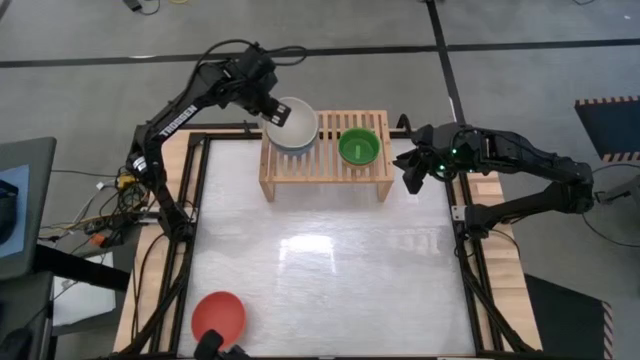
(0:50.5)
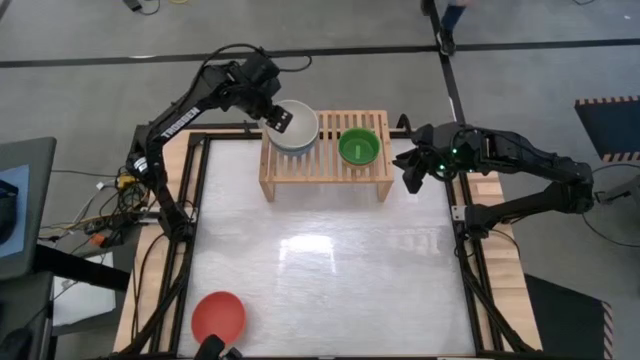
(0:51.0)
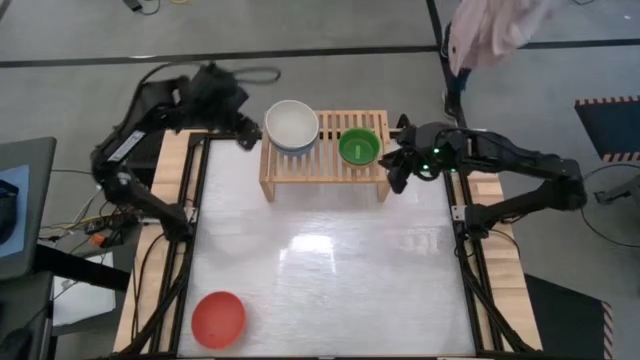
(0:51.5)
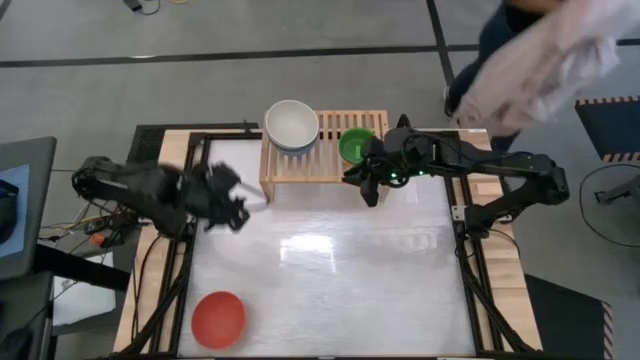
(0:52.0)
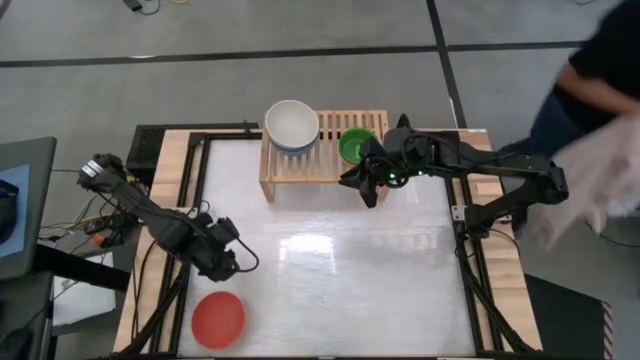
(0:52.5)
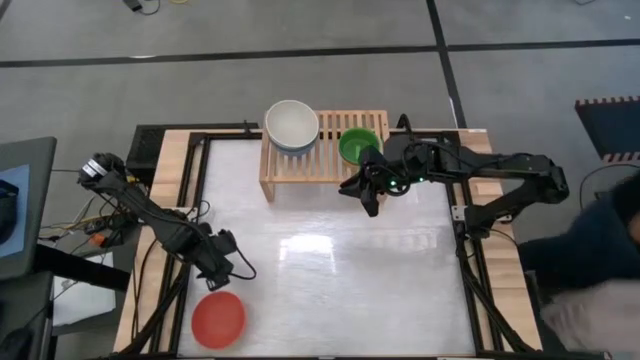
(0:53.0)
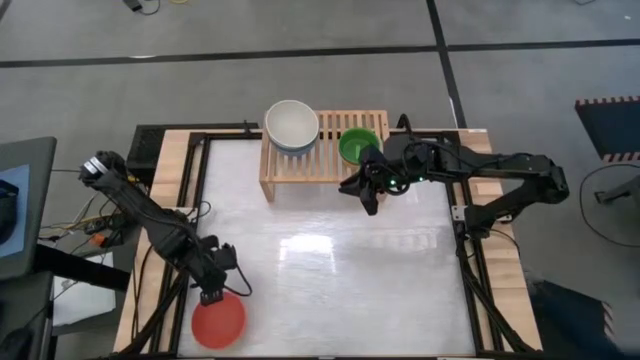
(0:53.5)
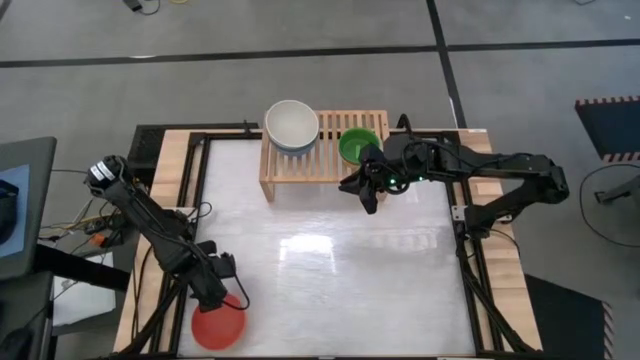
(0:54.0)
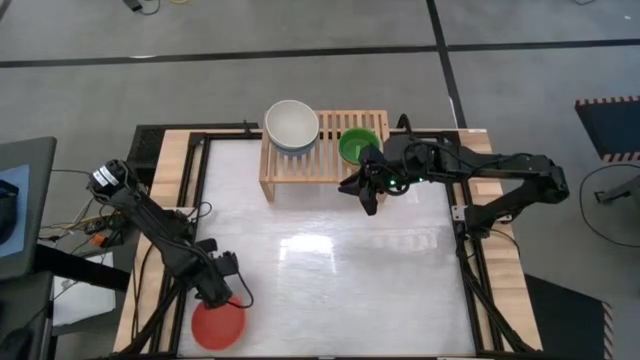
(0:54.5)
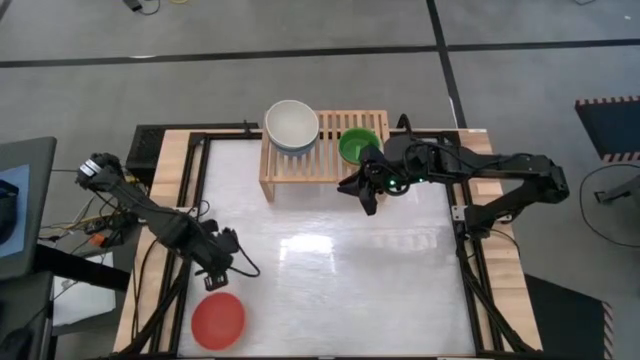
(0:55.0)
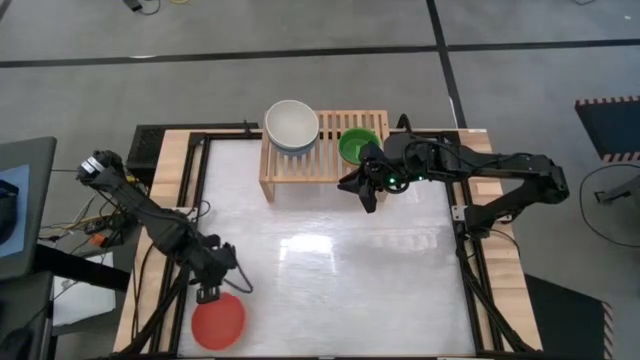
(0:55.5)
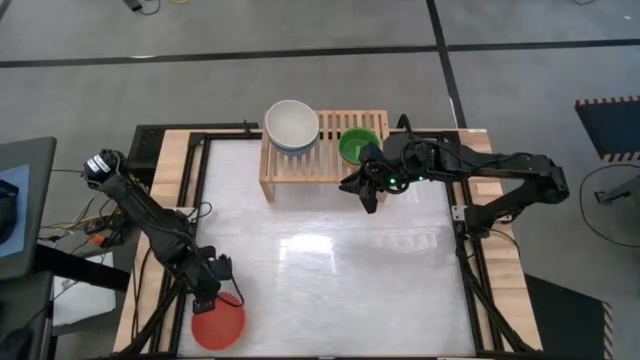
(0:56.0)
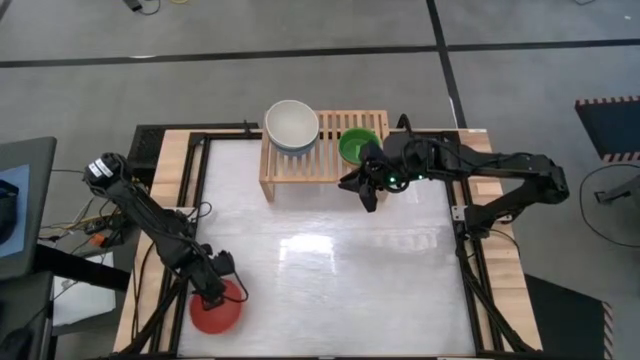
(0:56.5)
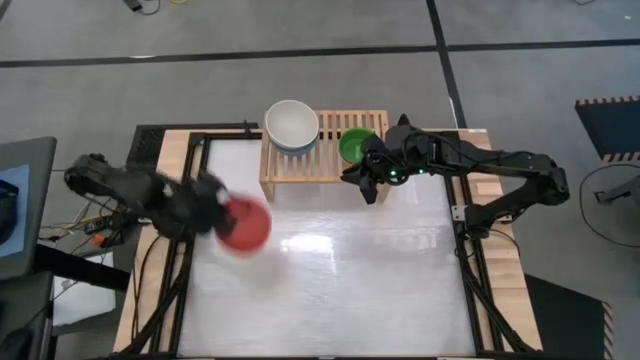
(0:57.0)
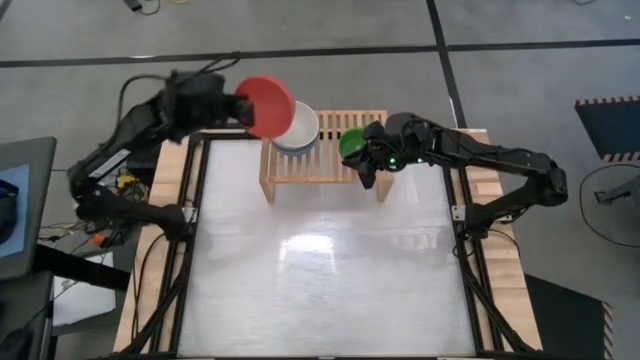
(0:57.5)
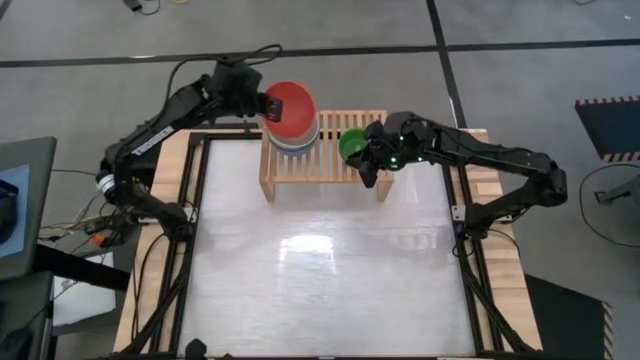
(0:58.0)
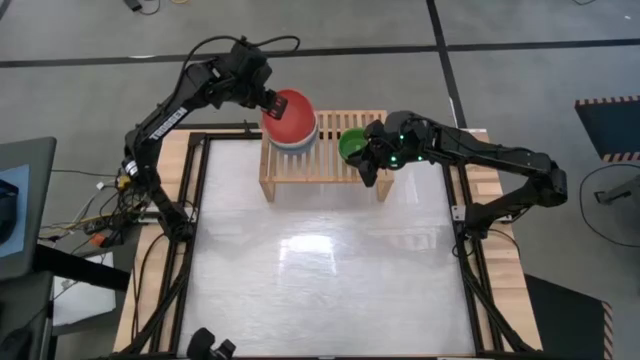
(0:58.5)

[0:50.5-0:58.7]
Task: Place and stack bowls onto a shelf
Stack the large orange bowl on the large white bowl on the shelf

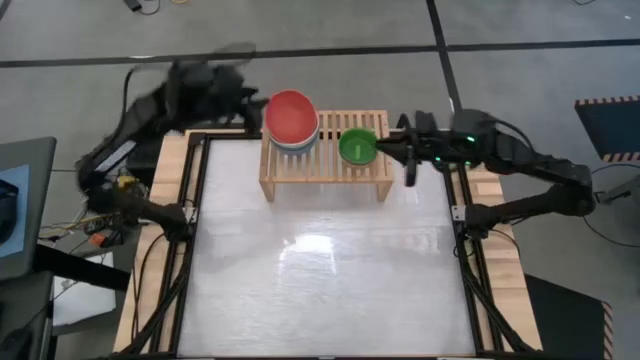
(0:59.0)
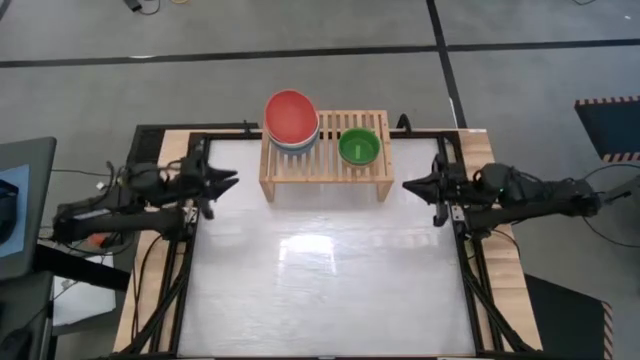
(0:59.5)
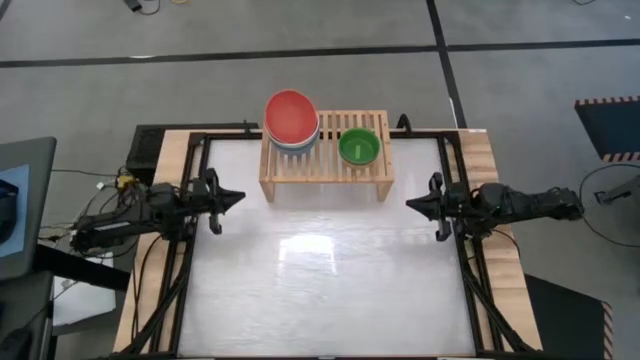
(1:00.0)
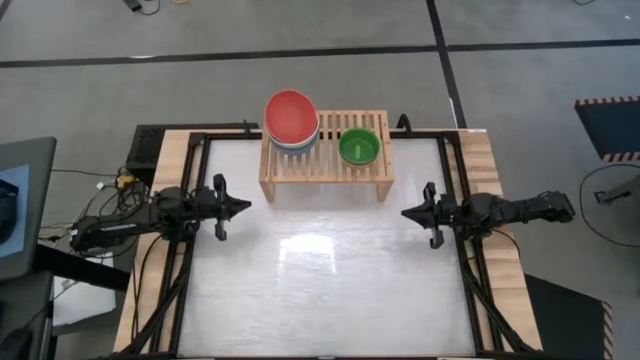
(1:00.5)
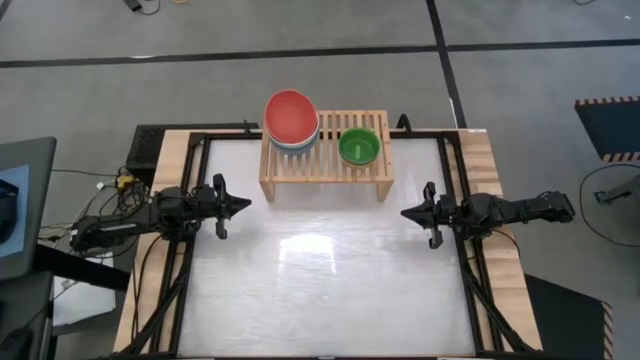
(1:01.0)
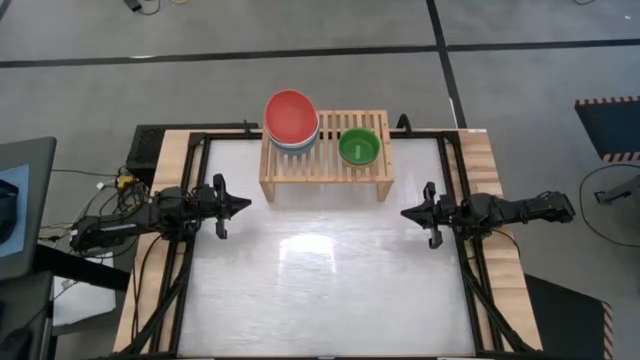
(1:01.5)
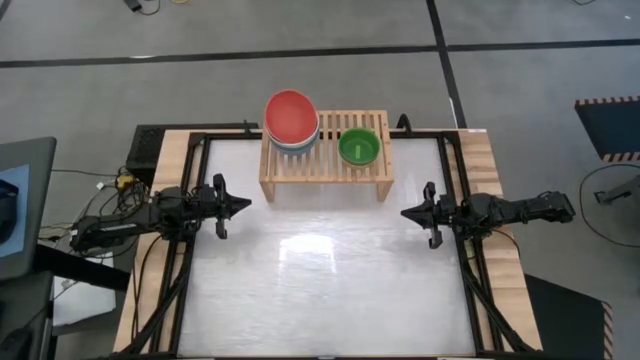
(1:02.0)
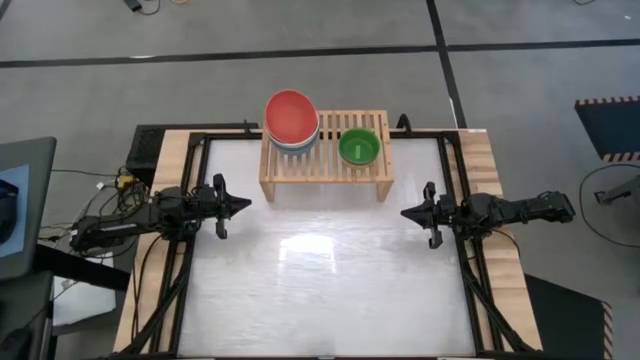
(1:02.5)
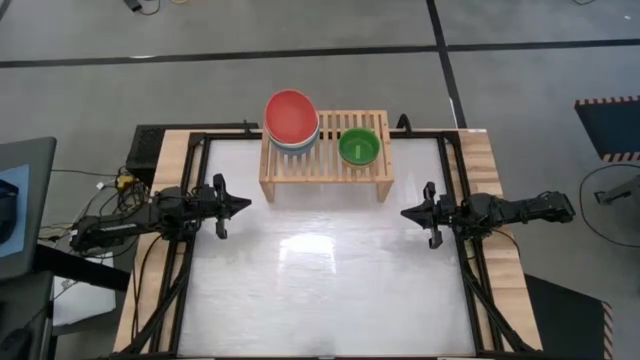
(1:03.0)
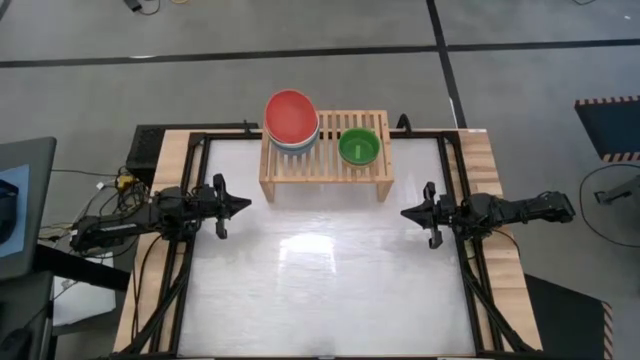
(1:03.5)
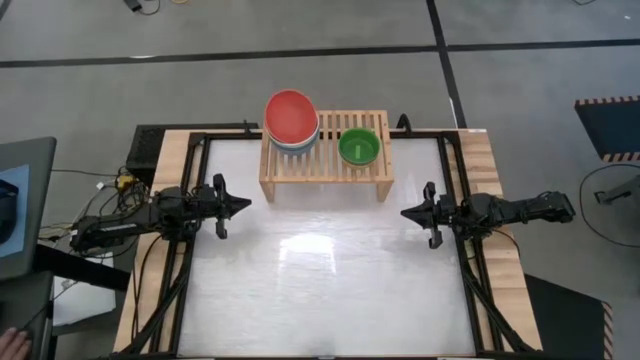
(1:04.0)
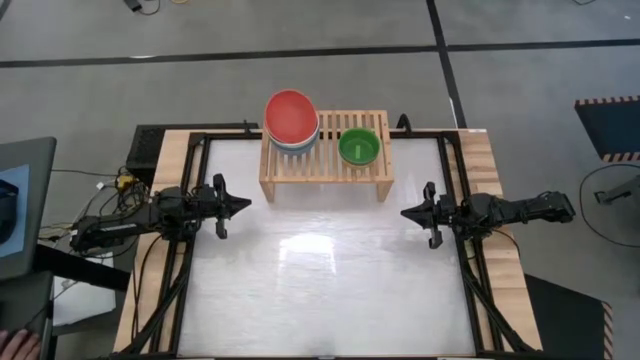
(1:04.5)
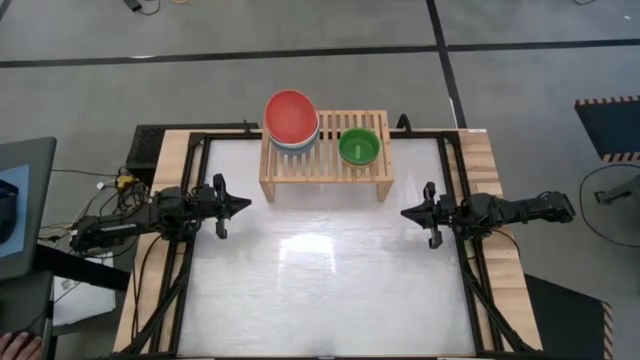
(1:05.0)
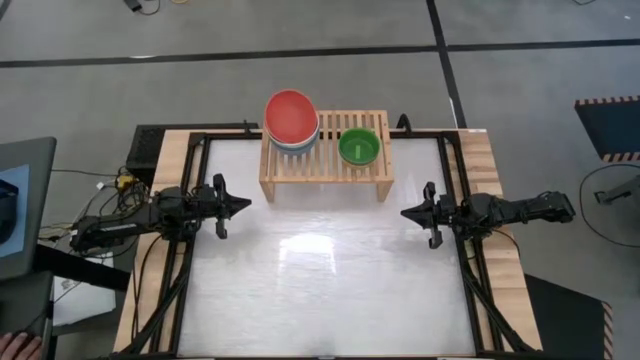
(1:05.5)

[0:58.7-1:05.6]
Return to Home Position

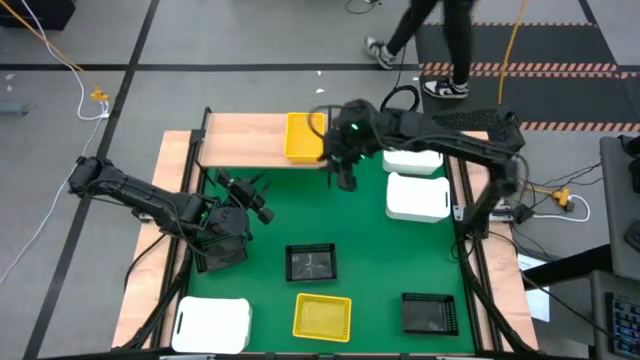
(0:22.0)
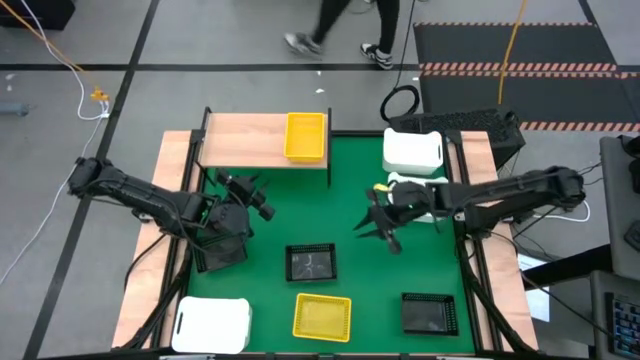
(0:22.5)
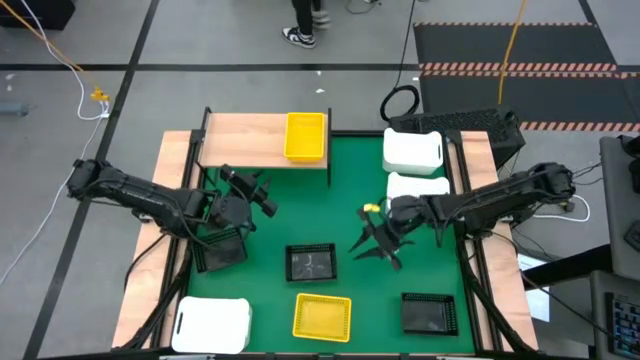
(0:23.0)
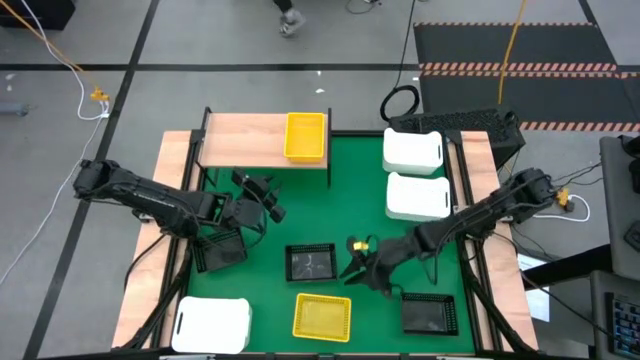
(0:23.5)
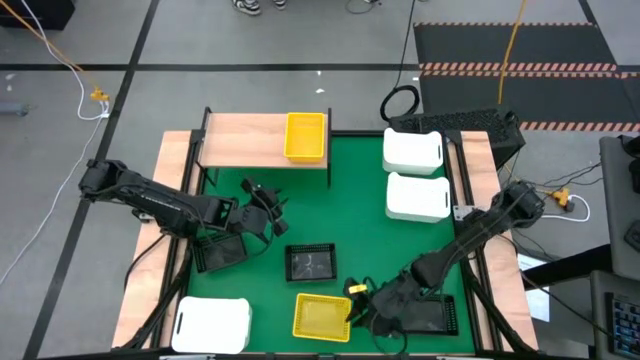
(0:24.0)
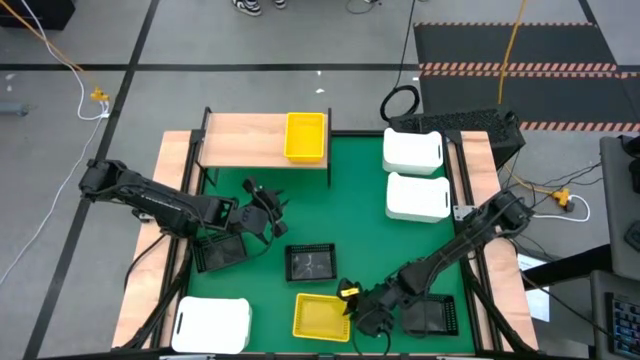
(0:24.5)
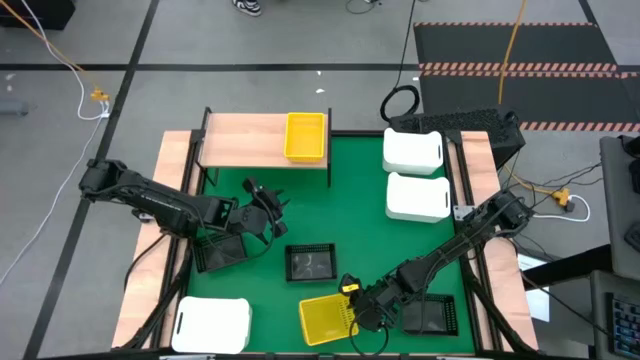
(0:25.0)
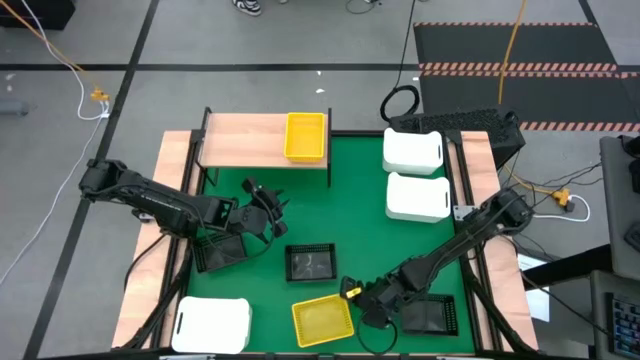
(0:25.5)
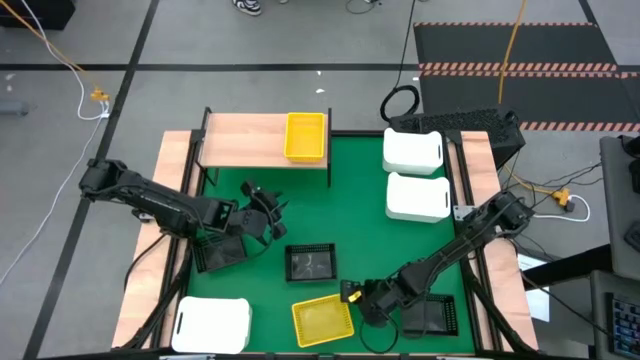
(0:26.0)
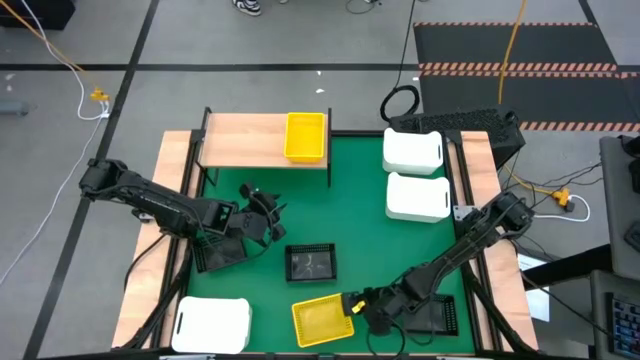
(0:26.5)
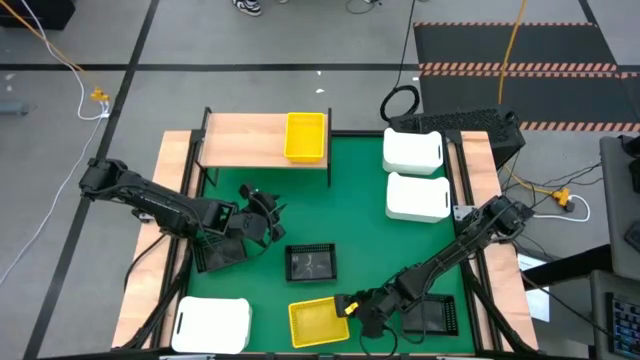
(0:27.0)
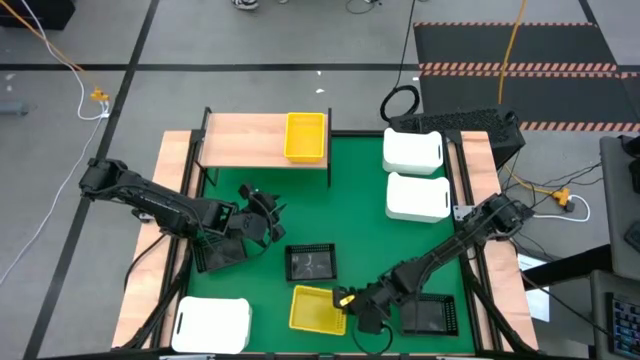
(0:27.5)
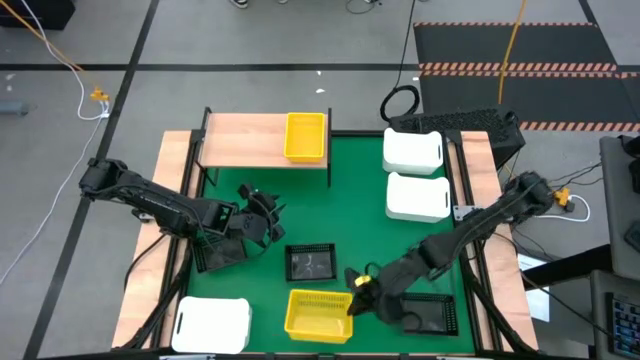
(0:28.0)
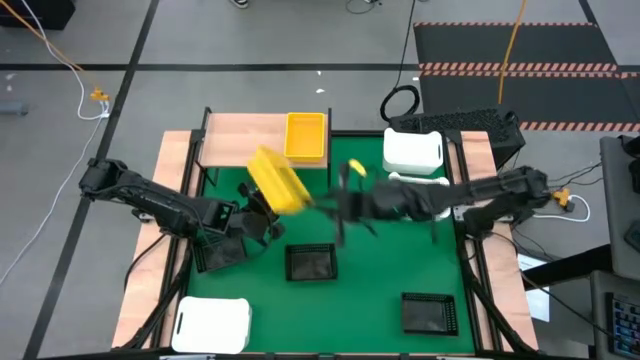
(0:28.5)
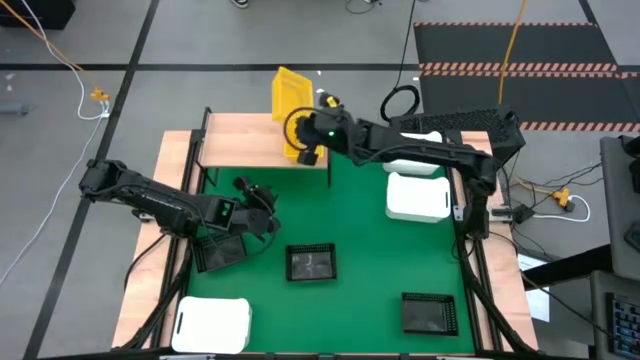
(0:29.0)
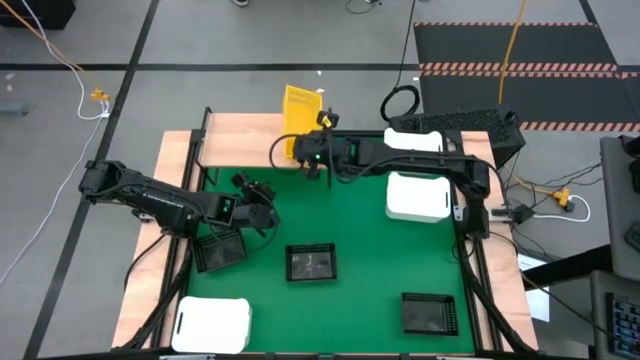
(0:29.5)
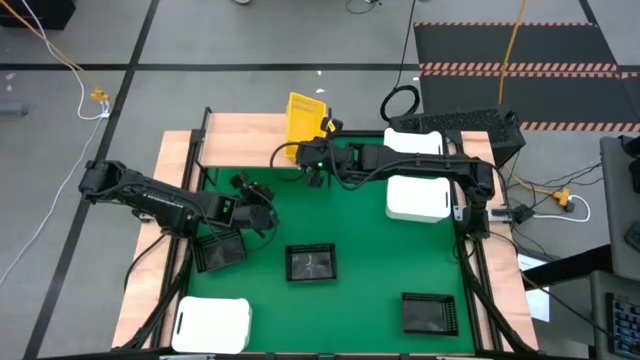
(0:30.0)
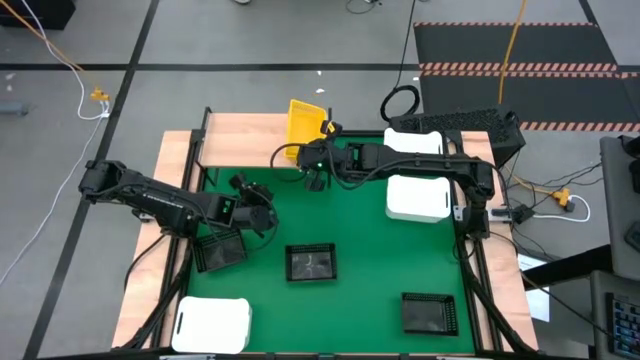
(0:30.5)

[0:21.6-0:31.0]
Task: Stack baskets on shelf by color
Stack the yellow bin on top of the other yellow bin on the shelf
